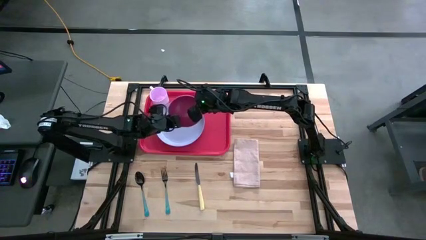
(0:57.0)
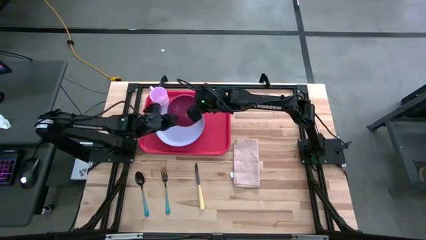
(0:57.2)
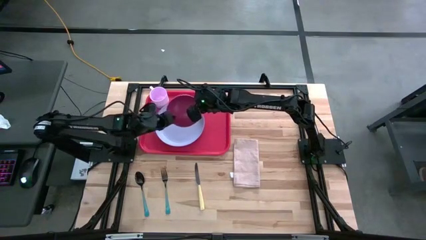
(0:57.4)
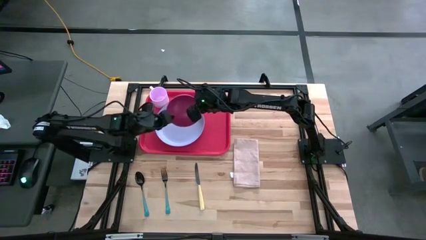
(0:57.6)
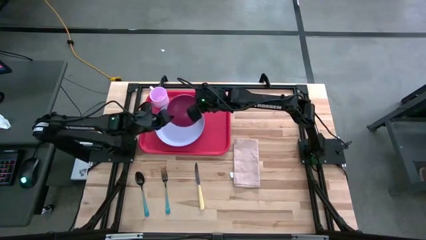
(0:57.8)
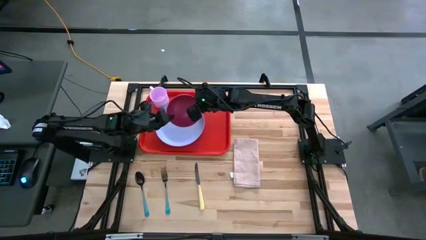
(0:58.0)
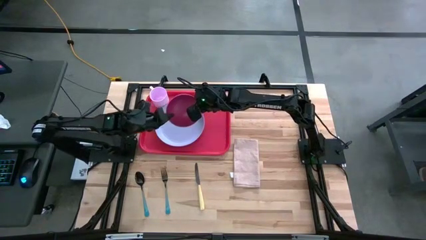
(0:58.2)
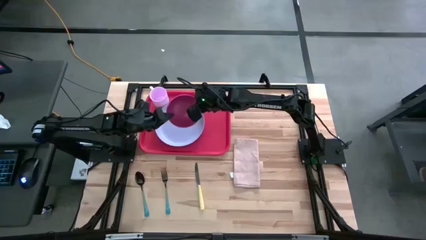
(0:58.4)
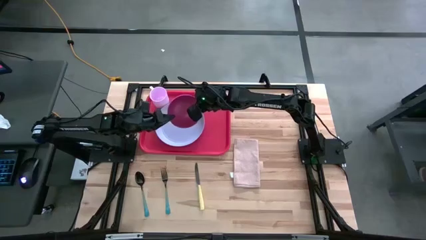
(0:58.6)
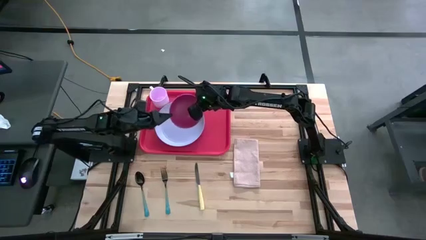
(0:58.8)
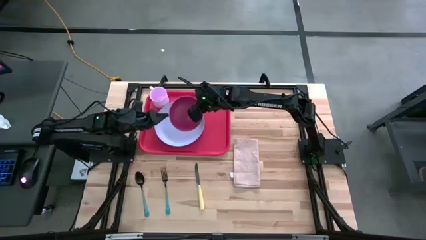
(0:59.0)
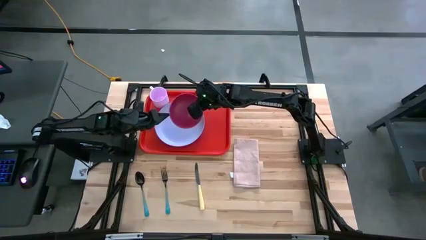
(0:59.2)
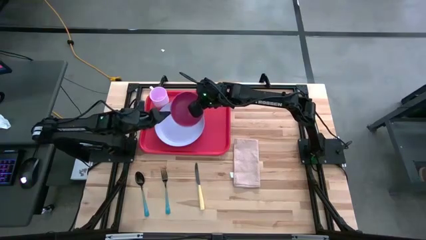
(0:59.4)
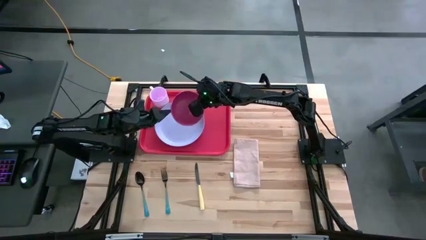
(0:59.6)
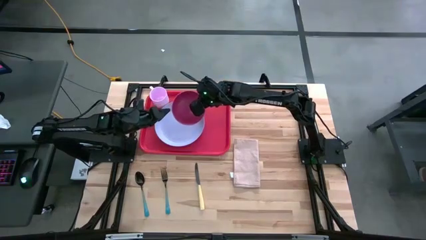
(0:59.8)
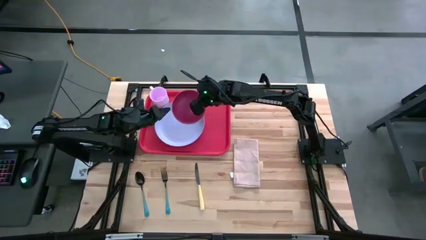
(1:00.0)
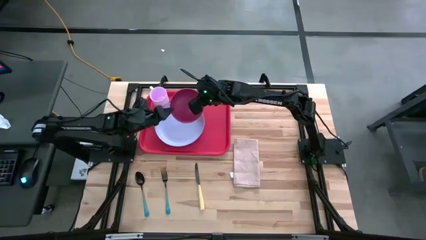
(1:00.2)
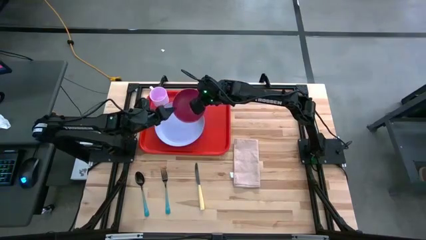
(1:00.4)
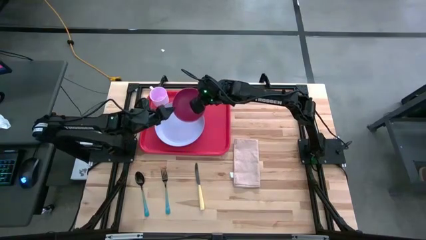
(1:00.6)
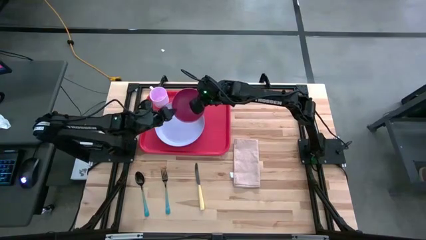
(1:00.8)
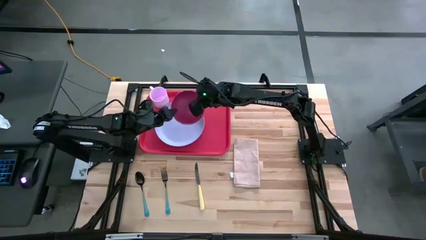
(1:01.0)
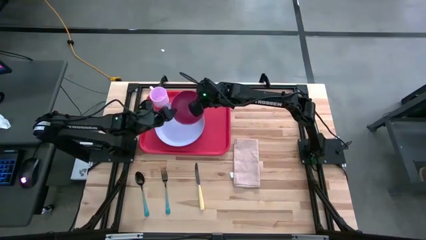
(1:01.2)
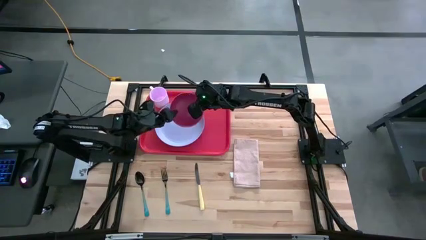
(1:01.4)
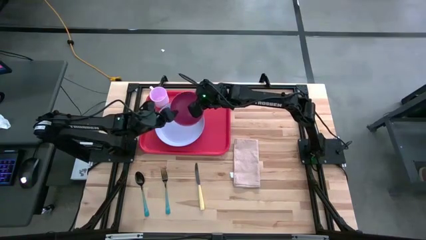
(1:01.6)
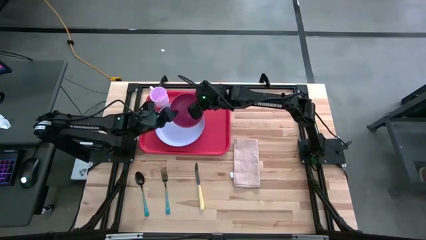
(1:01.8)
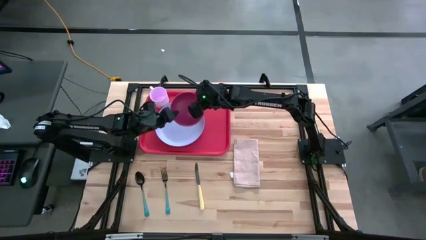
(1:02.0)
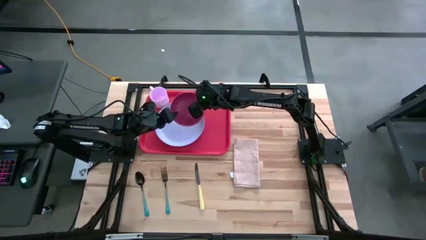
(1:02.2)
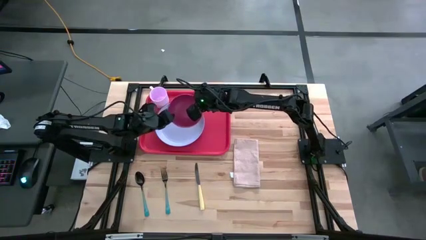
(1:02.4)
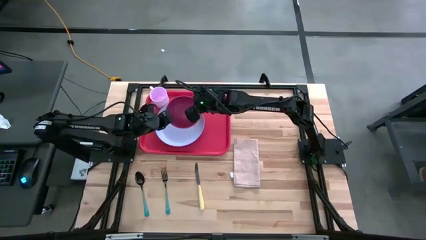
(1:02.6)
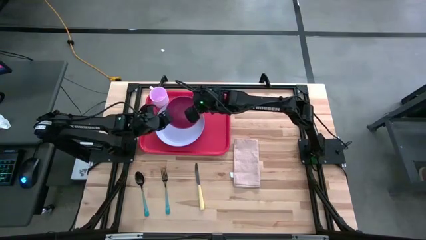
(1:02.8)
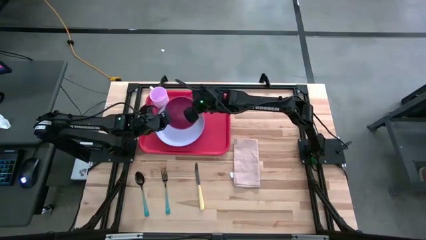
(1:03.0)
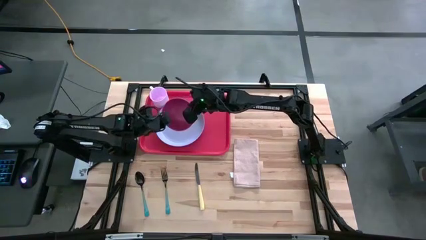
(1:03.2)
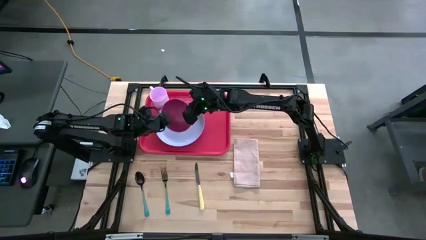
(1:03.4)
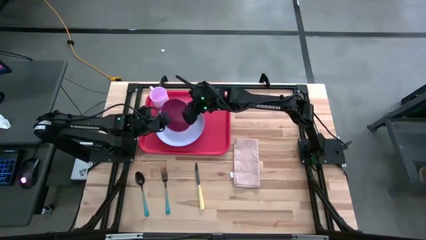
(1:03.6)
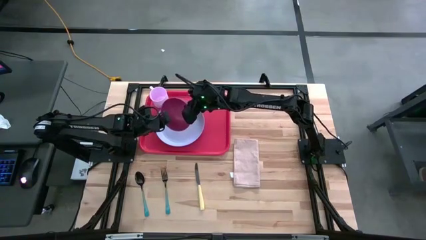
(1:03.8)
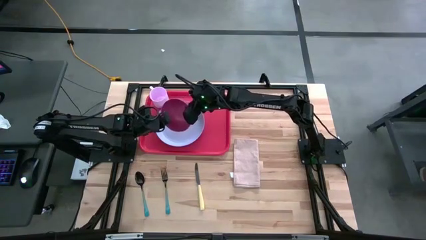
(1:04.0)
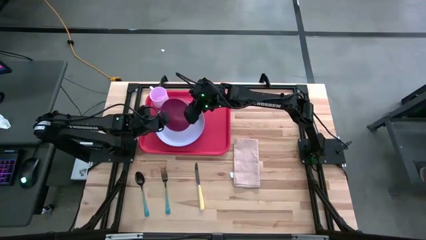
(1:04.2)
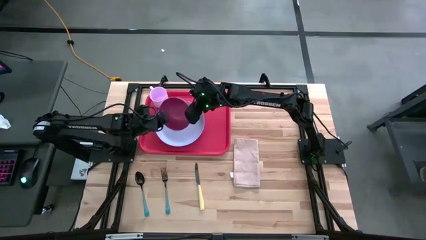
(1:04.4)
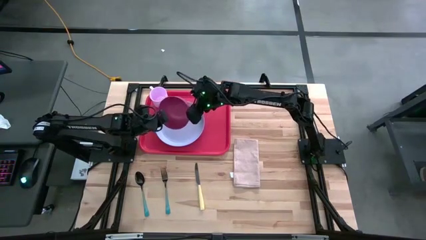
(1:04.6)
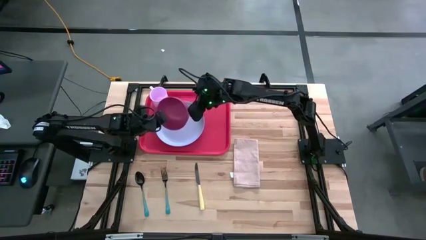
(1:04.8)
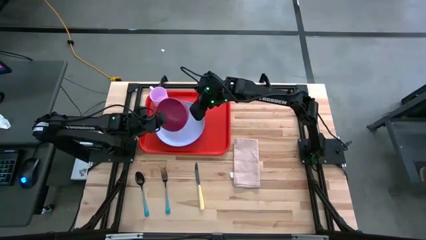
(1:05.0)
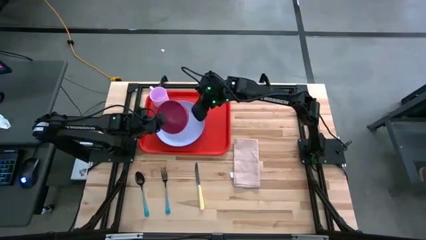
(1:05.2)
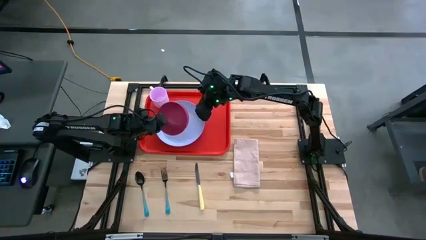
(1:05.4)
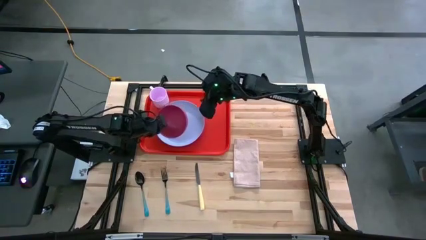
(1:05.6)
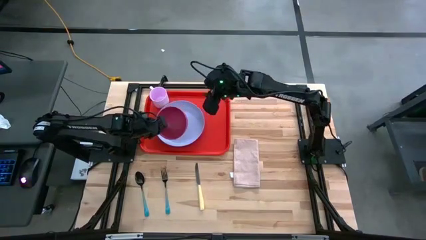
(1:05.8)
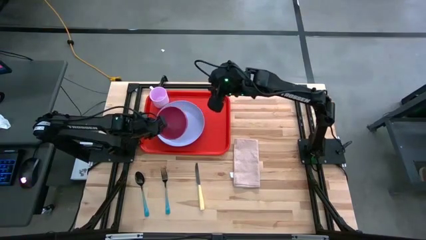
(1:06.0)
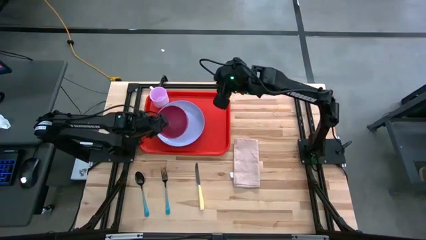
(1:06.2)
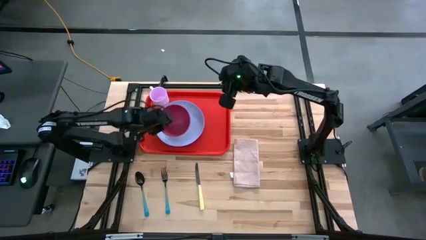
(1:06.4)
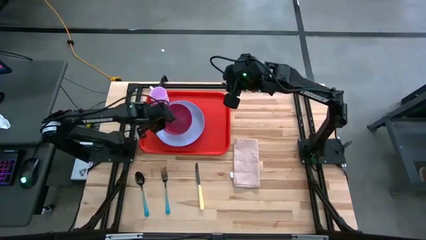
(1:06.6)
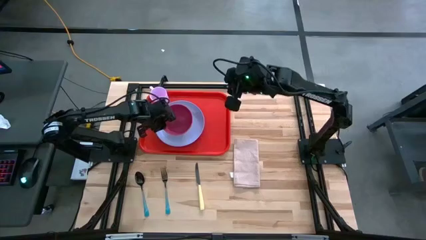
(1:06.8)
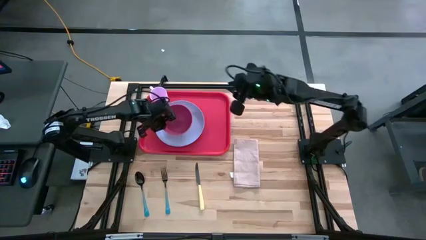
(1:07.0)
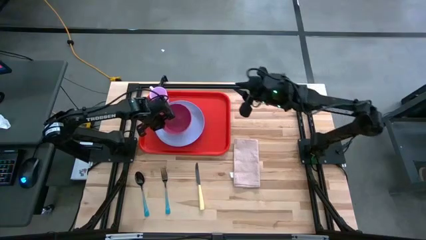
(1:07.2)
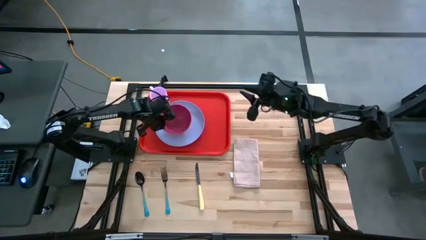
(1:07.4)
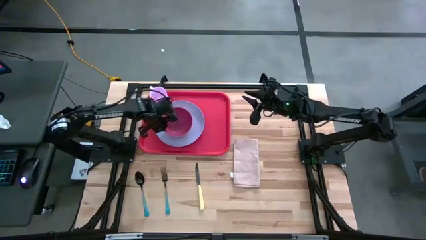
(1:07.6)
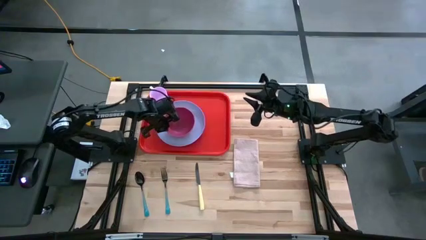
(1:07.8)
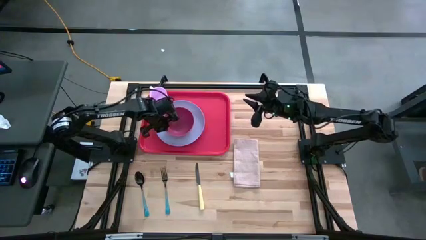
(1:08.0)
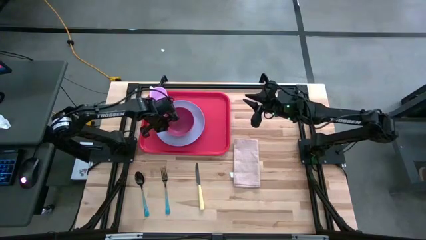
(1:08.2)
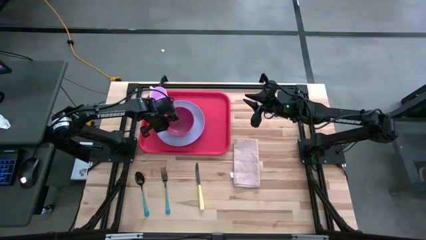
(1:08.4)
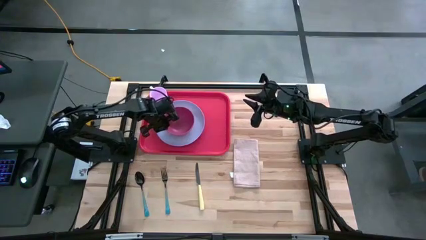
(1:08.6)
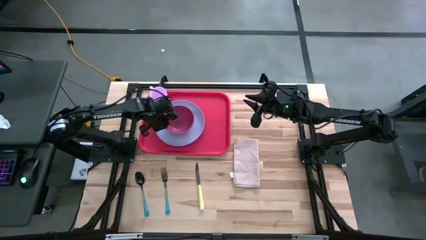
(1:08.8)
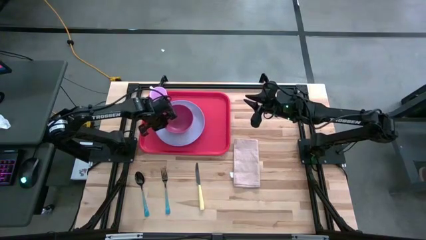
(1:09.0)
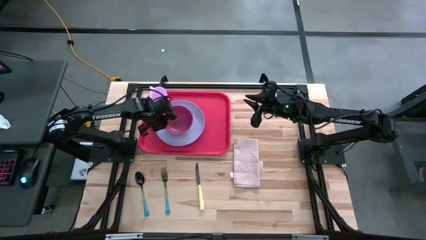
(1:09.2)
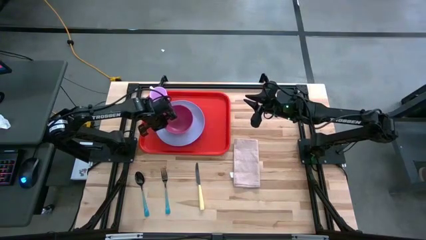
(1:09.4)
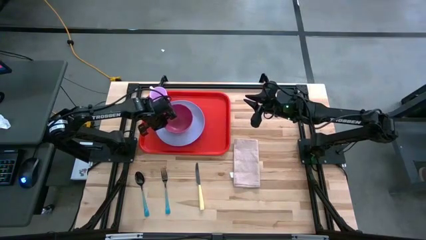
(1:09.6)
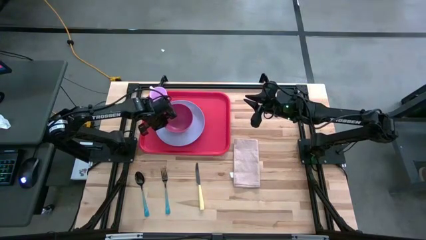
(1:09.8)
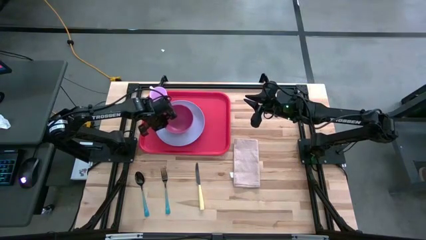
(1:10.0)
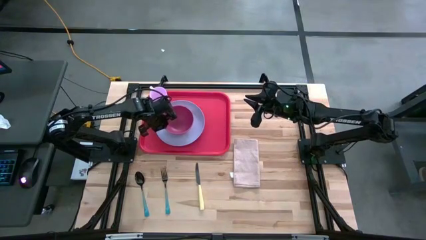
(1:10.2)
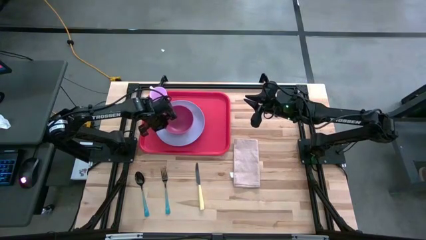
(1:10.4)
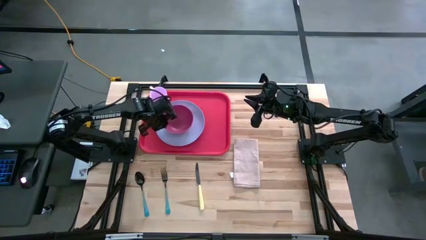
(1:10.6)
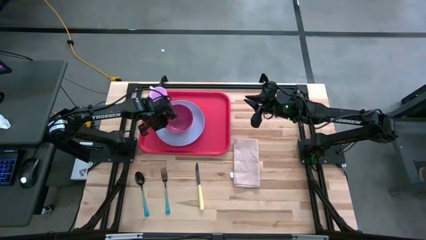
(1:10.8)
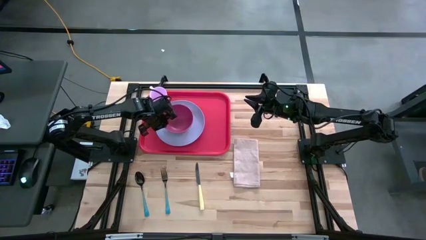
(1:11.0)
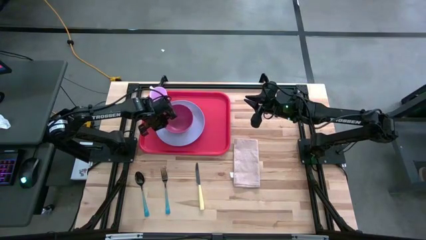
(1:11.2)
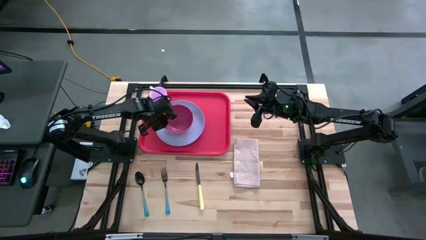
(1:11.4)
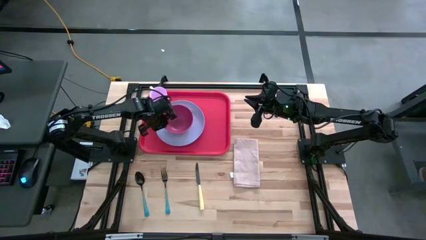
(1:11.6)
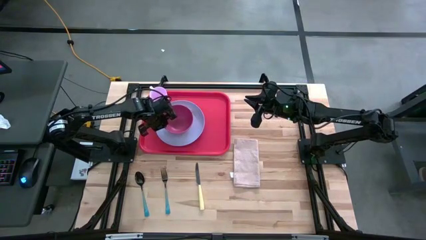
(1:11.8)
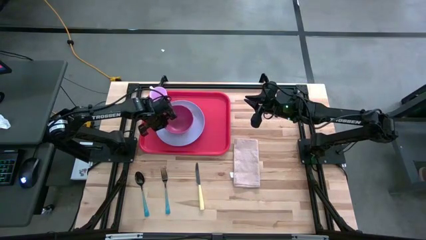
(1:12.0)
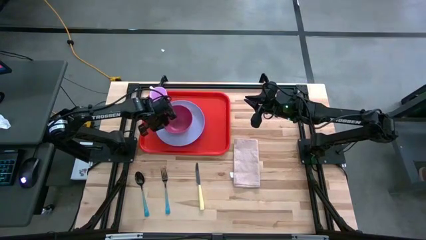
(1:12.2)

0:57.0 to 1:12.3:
Task: Set up tray
Put the pink bowl on top of the violet plate on the red tray
